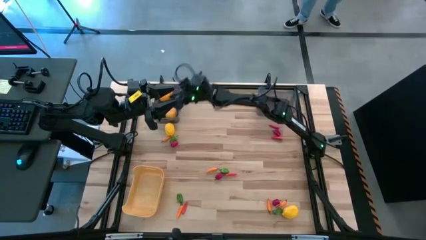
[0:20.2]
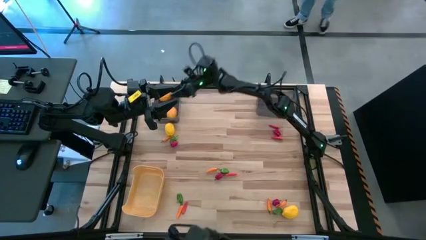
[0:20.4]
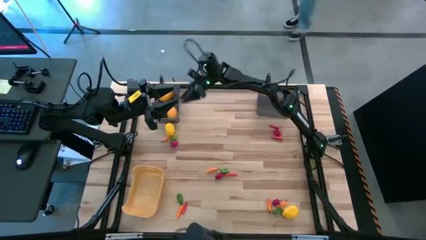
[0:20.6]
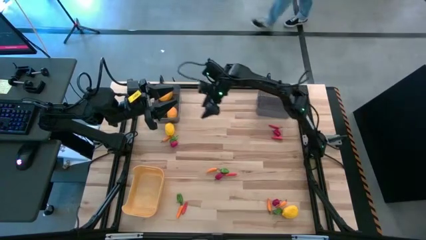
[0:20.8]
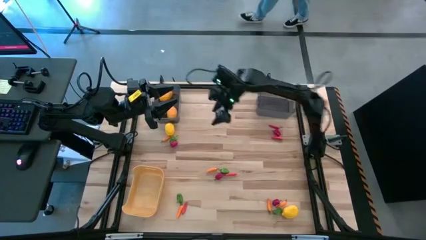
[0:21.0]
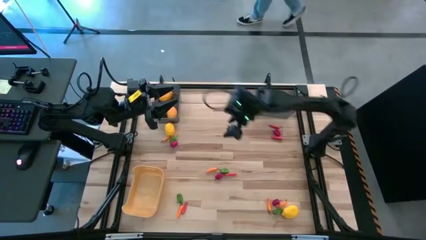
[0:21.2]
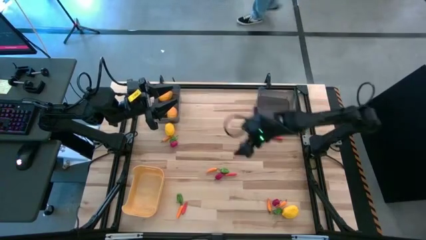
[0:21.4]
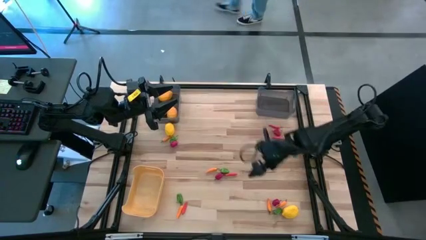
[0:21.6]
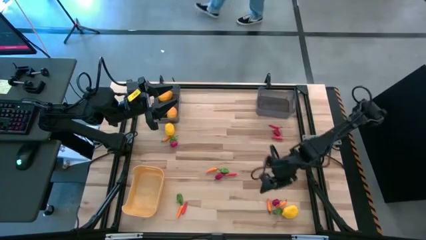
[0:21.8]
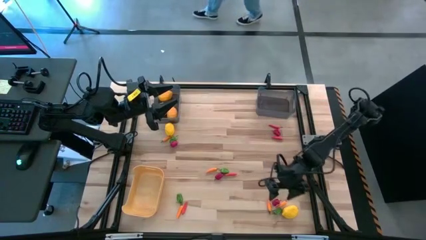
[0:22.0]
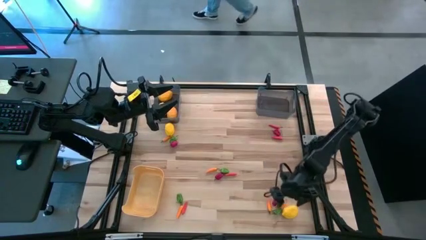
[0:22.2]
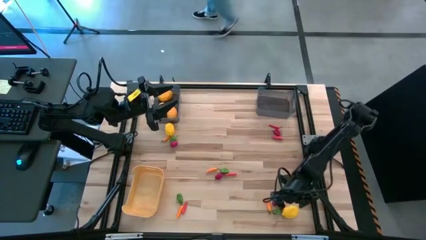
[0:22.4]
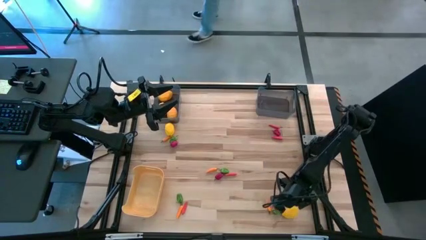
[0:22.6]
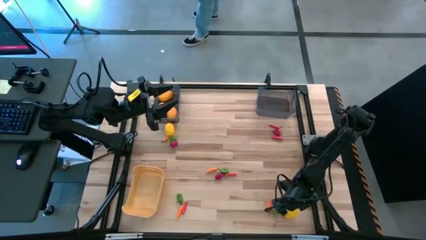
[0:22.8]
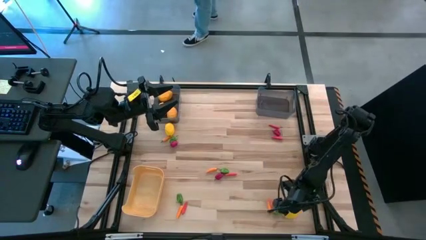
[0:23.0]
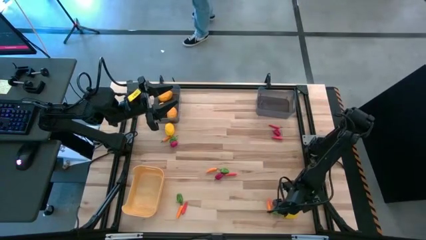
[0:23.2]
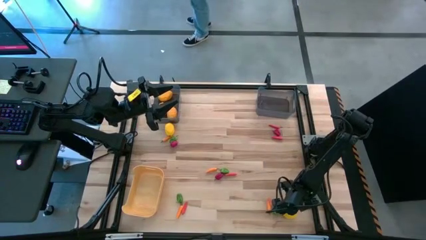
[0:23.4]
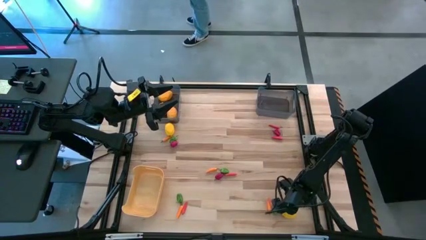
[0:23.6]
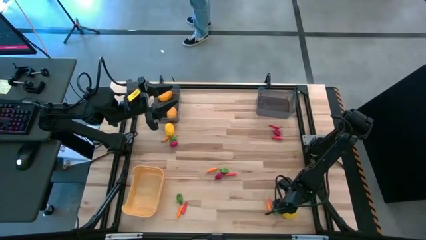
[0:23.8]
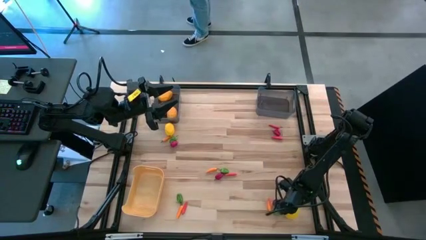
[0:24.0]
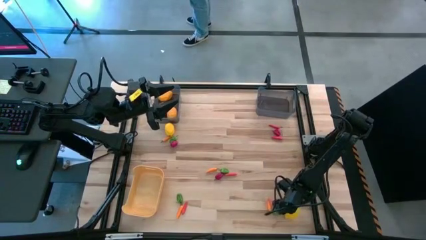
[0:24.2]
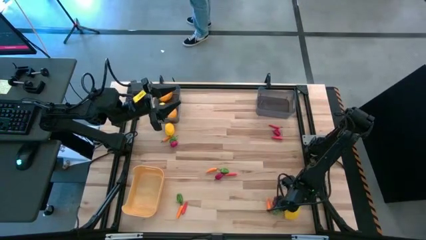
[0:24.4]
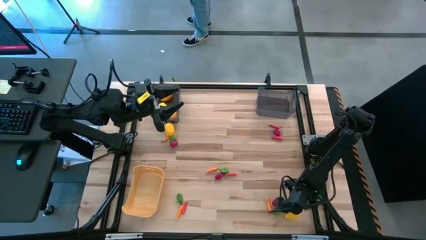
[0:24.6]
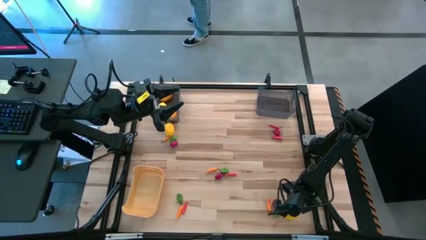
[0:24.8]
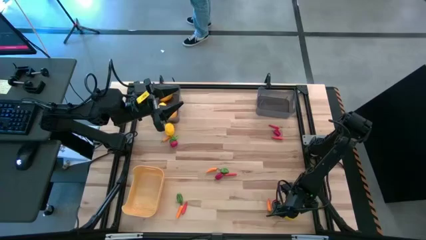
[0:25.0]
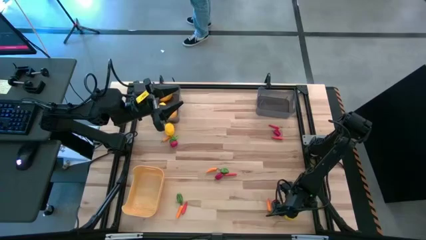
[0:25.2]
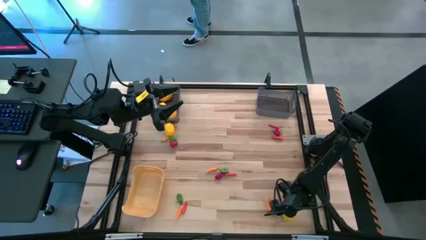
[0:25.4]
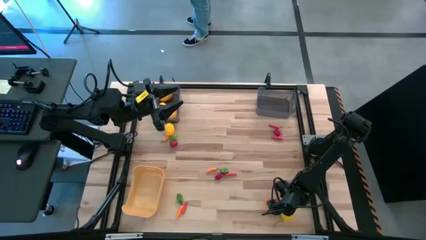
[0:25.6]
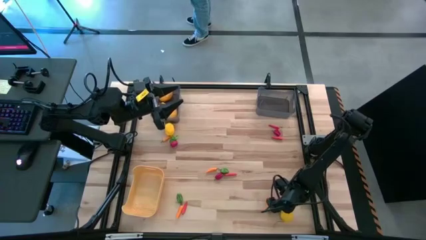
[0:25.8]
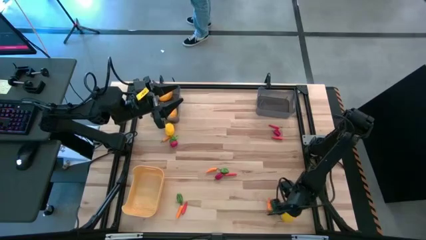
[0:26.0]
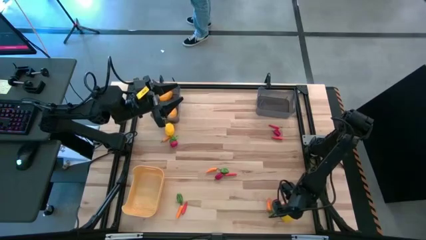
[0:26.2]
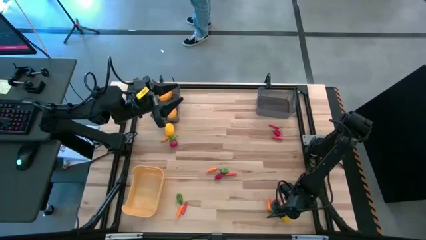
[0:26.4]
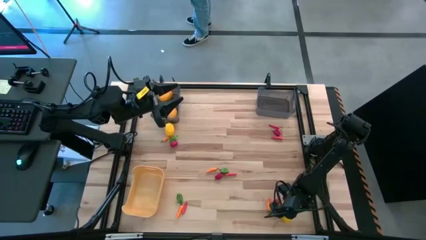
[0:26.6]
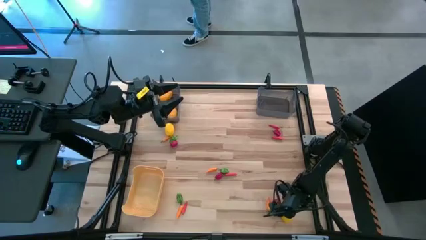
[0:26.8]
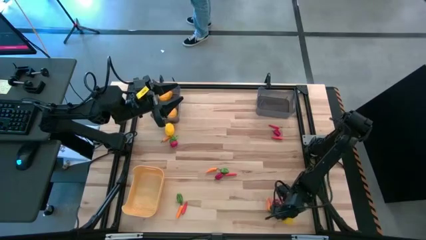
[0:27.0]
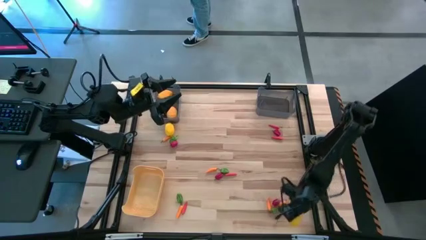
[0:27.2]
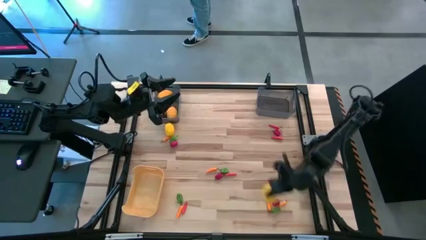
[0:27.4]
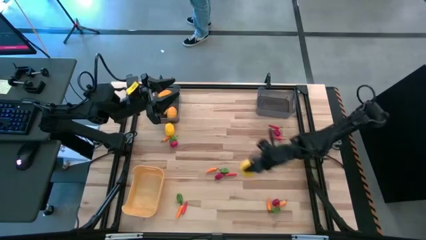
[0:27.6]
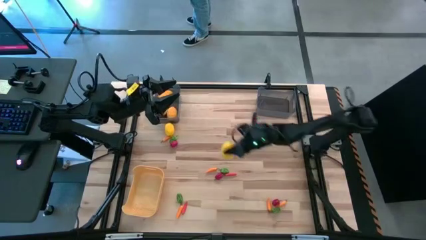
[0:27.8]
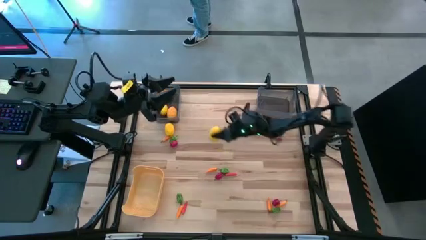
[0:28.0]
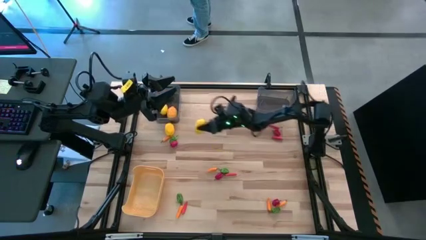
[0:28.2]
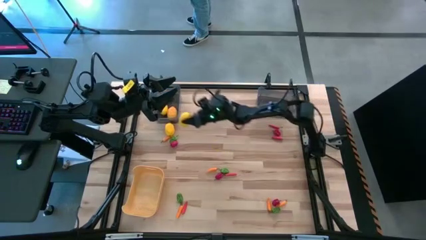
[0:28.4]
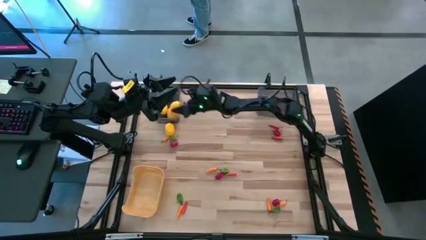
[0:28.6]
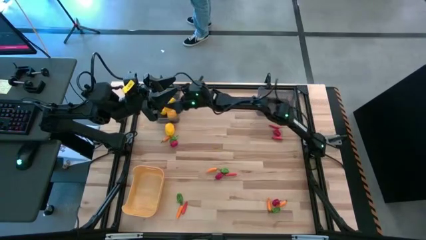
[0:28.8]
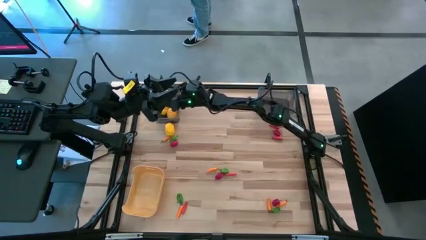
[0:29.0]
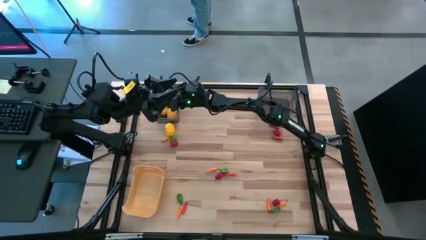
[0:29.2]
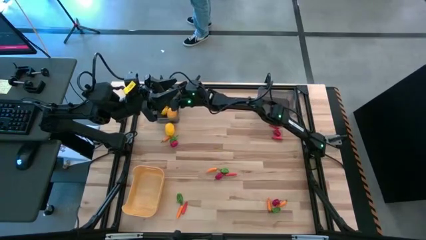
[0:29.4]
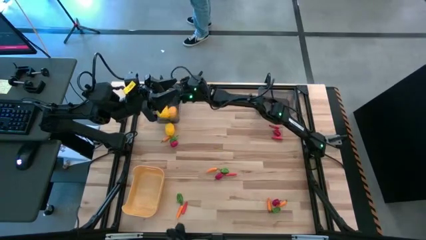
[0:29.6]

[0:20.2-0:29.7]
Task: Sort produce into baskets
Put the bottom yellow lemon into the left black bin

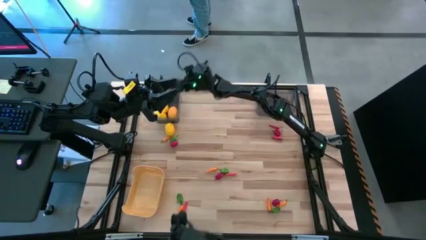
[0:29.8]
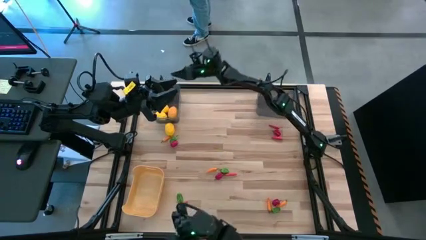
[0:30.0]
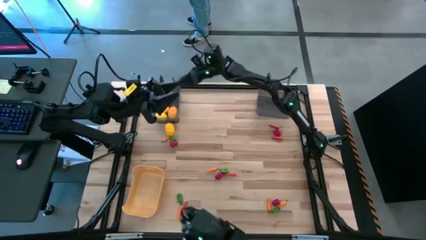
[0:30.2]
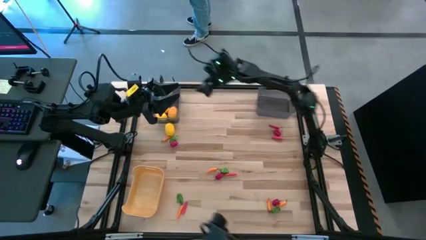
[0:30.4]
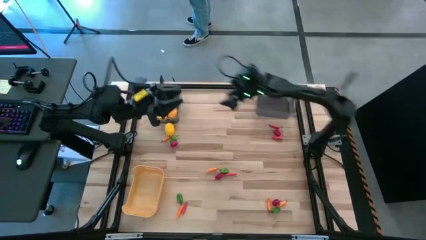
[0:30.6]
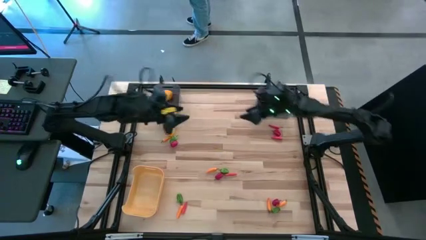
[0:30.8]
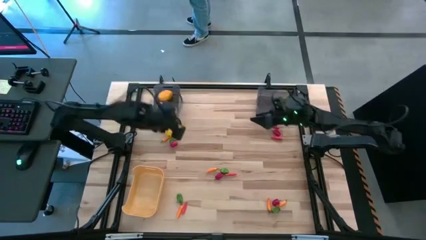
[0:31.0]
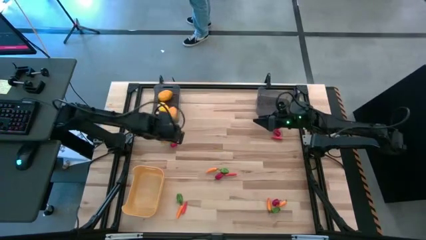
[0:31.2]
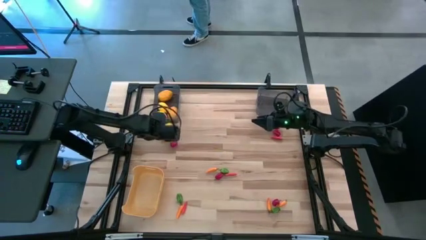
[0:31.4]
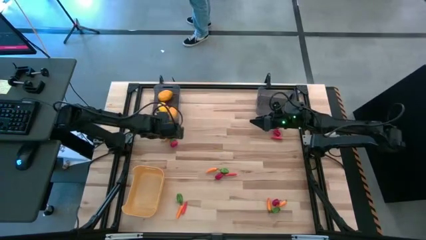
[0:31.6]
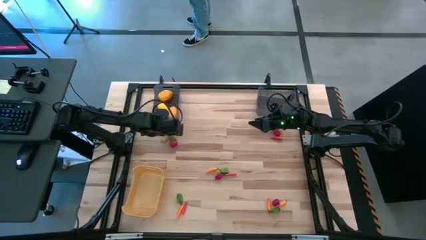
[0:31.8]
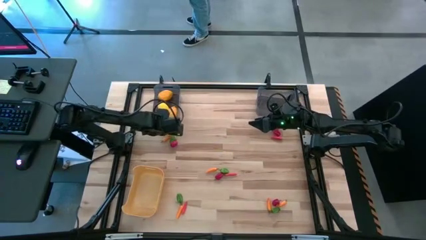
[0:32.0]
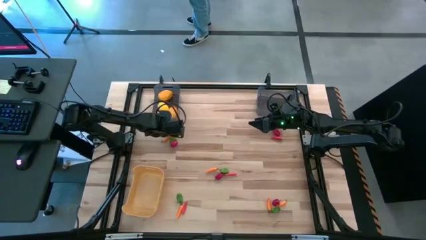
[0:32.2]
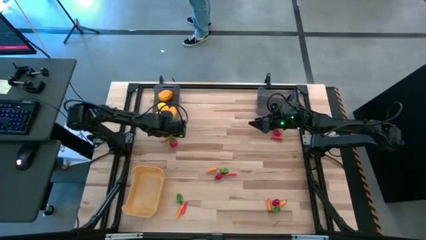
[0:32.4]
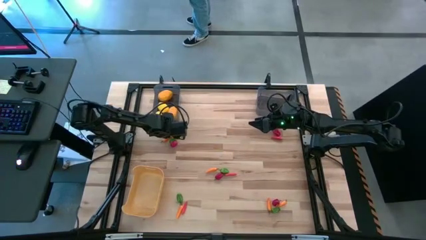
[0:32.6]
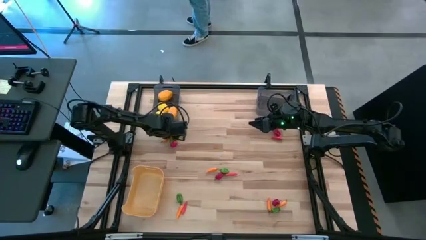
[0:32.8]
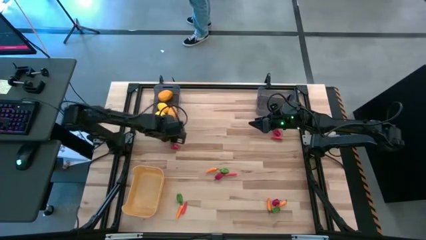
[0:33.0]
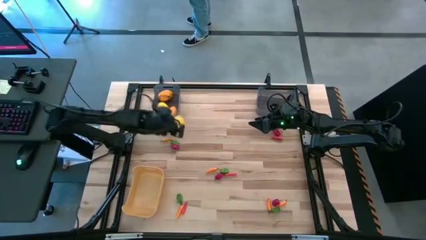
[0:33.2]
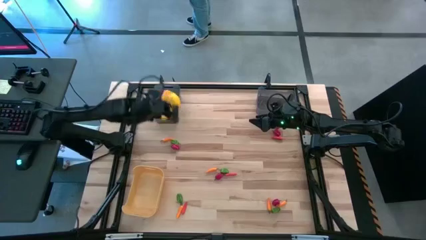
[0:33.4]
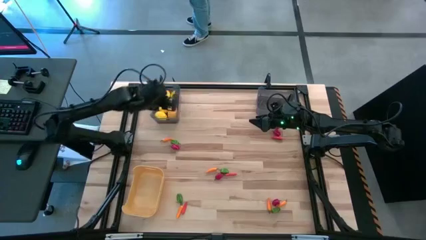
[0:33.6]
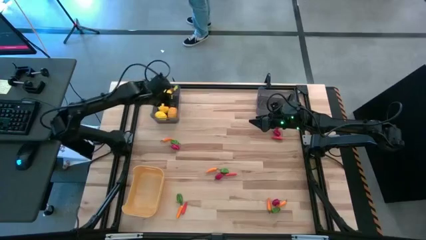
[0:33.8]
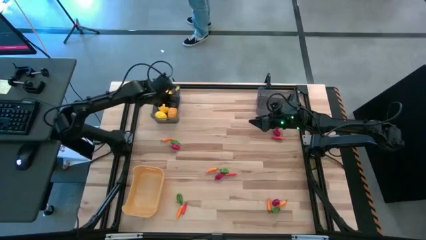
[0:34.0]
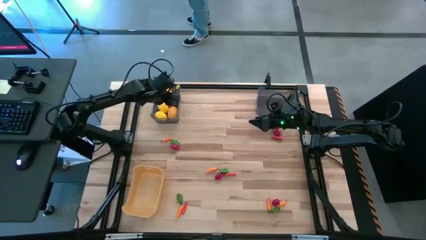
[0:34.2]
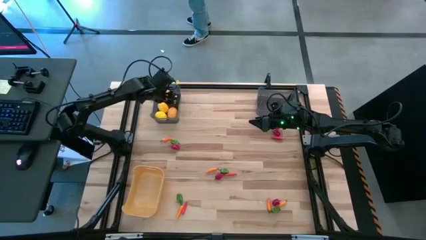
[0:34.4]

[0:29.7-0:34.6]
Put the yellow lemon into the top left black bin

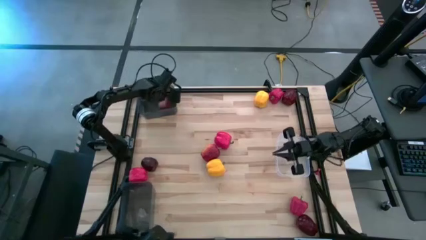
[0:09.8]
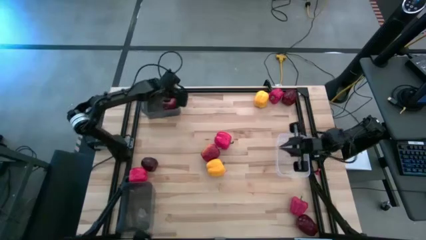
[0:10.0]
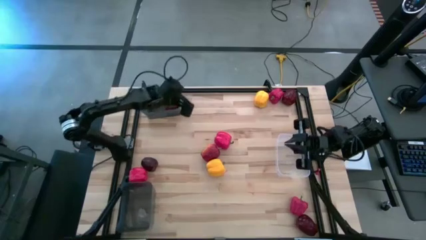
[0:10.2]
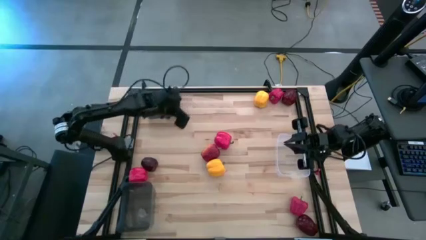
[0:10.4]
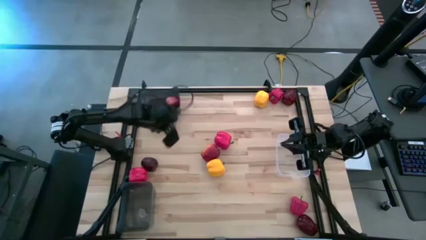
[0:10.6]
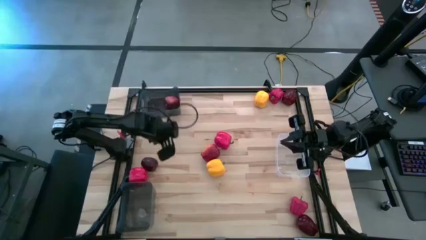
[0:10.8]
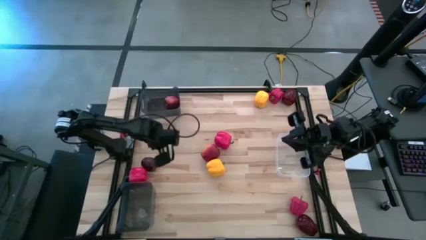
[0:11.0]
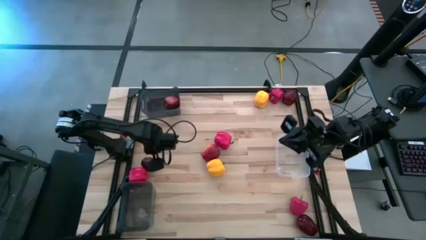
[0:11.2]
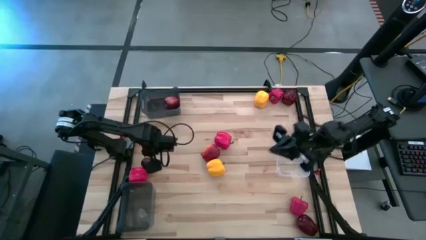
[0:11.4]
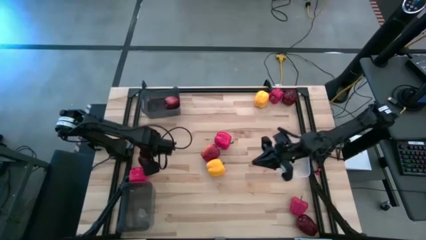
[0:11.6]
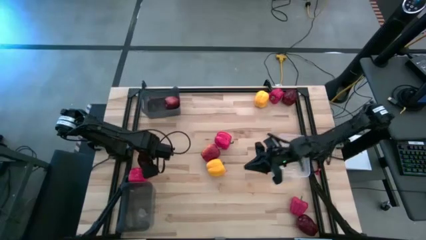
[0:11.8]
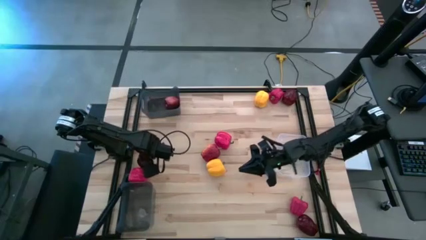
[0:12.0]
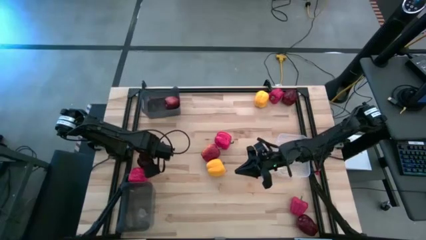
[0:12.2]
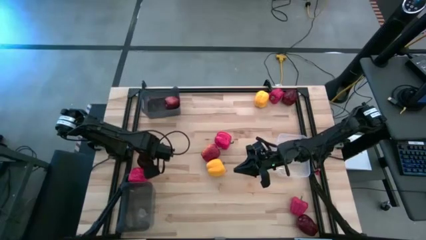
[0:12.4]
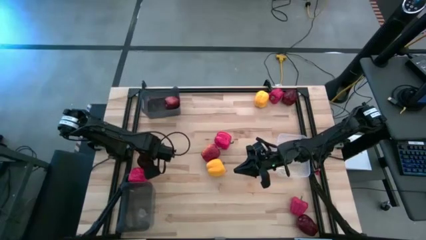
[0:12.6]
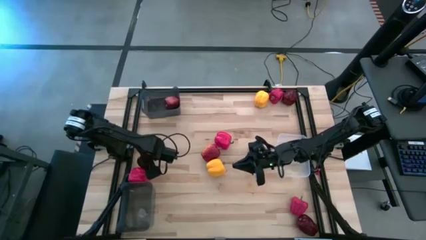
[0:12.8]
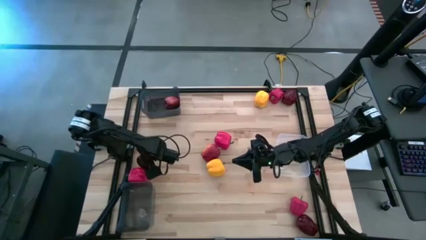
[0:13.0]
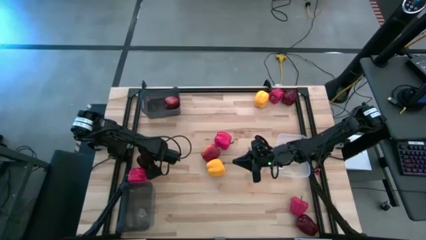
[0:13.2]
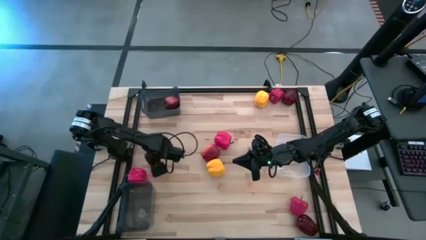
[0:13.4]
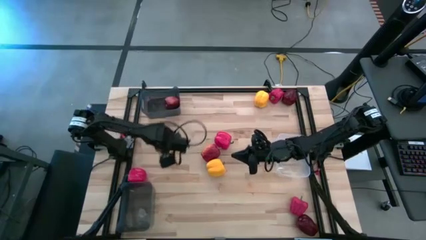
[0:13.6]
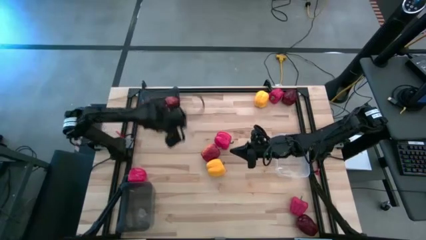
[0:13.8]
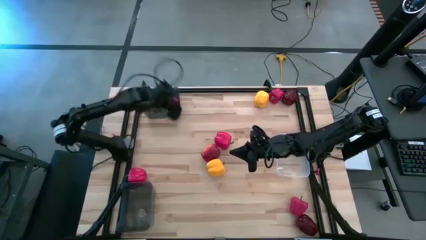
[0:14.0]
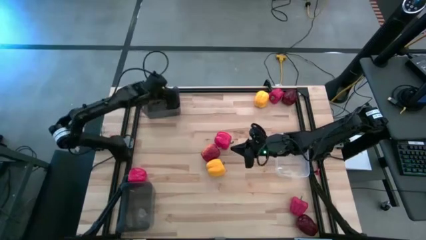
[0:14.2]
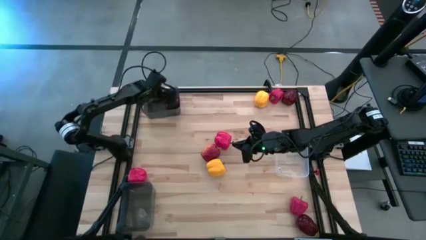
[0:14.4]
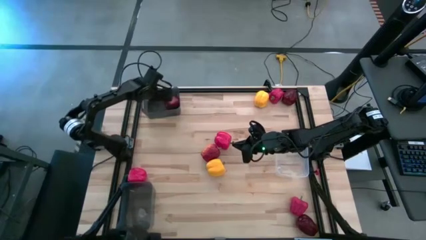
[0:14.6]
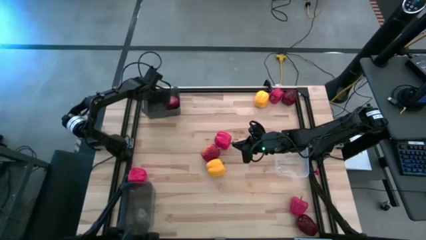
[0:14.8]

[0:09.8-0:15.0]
Task: Sort produce into baskets
Put the apple into the top black bin
